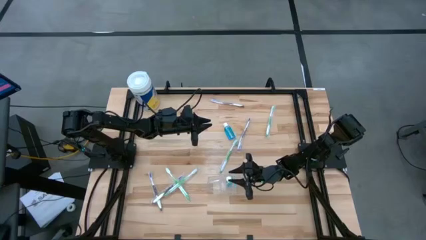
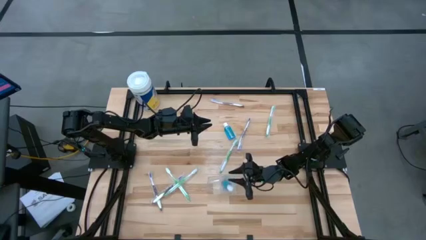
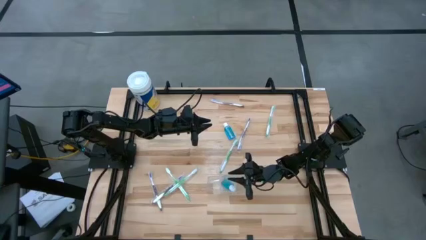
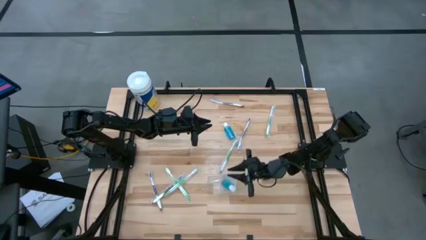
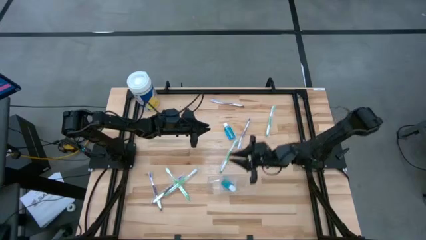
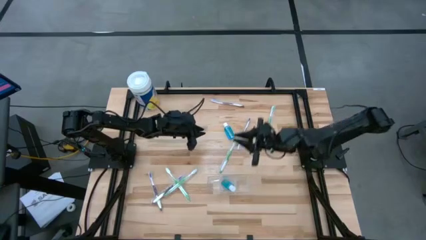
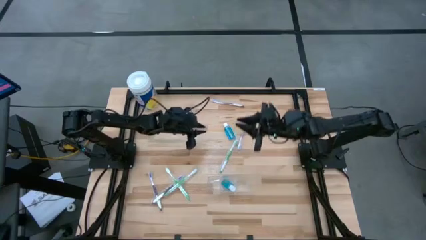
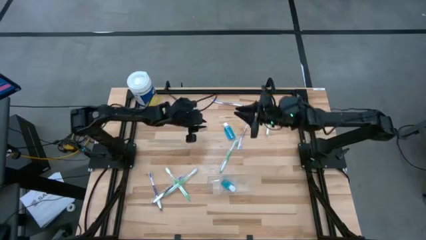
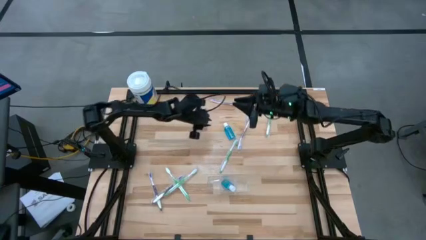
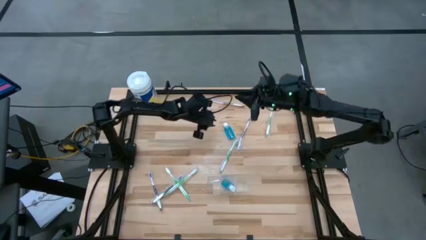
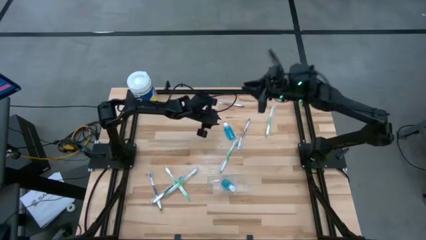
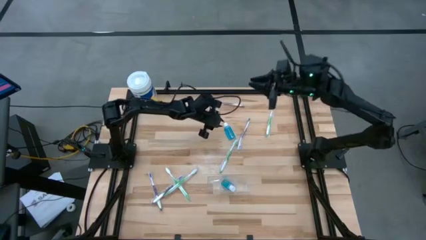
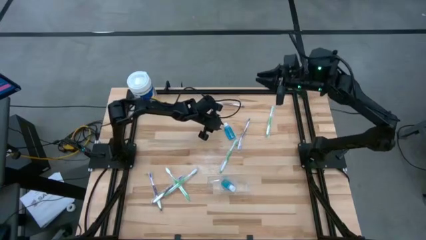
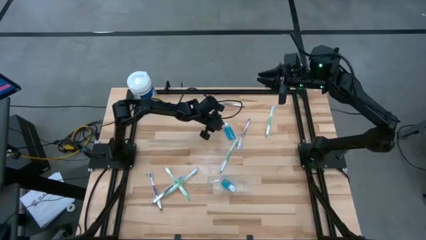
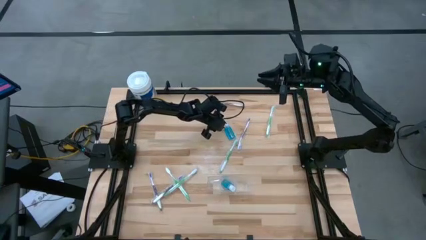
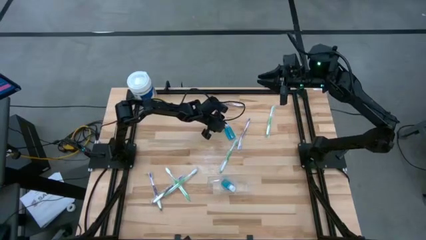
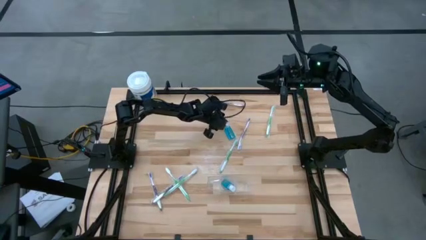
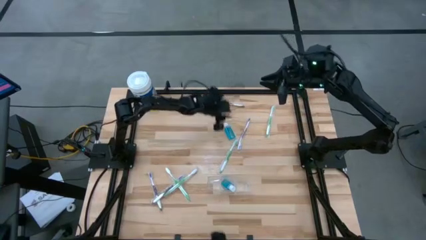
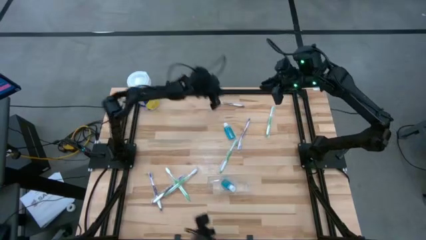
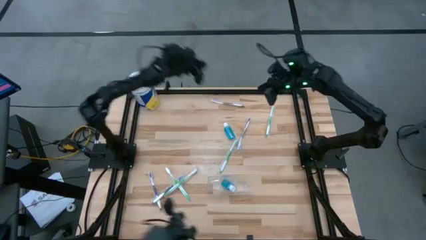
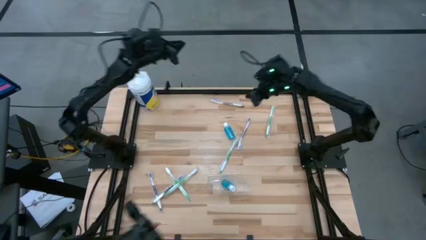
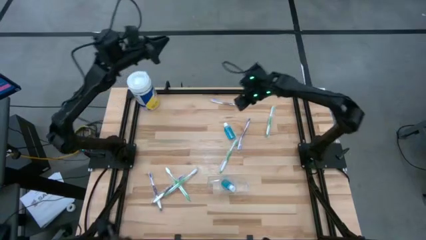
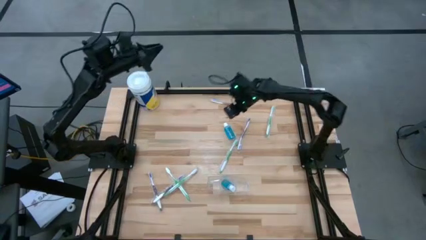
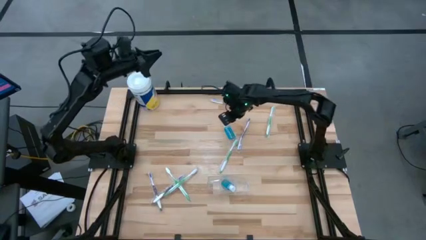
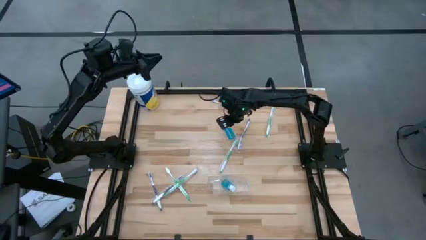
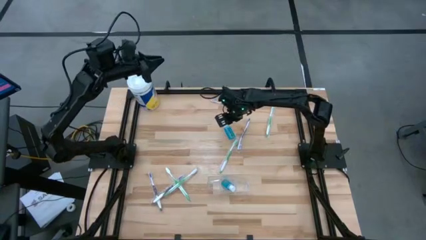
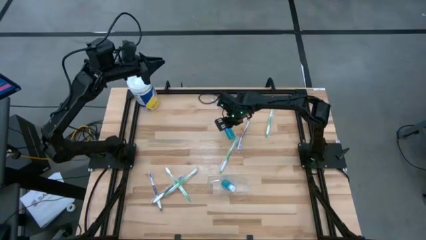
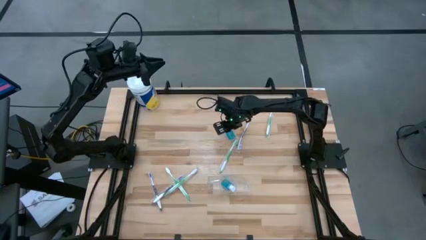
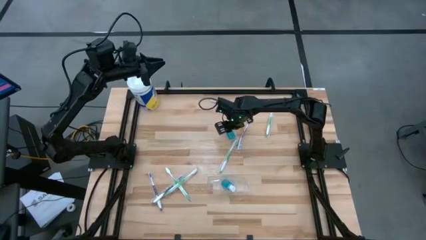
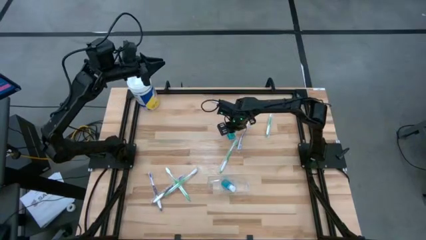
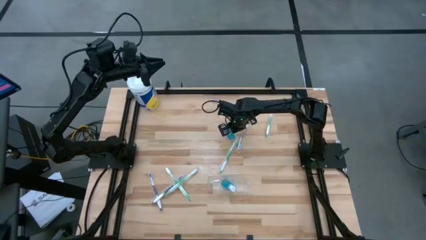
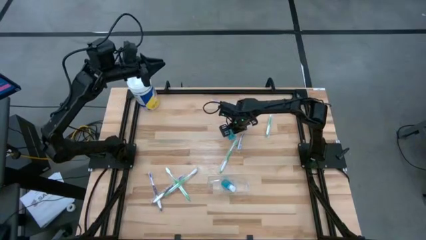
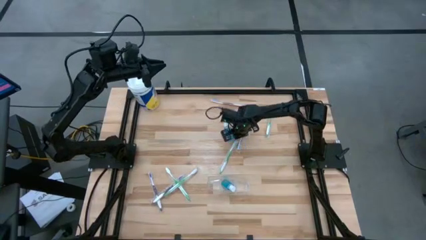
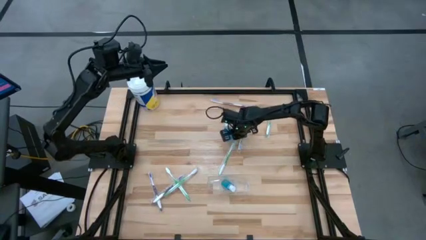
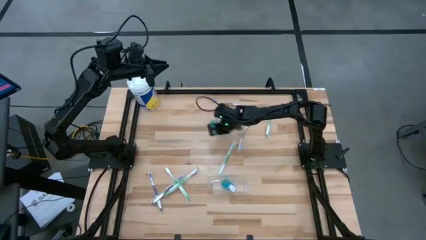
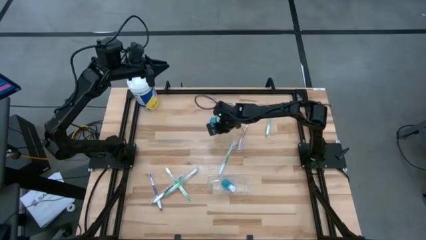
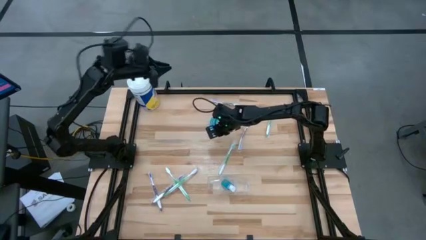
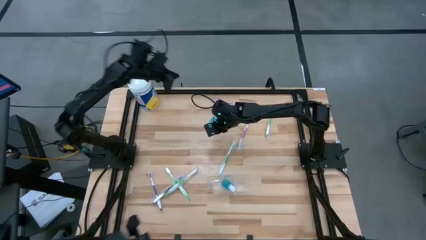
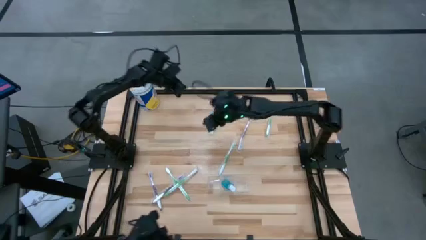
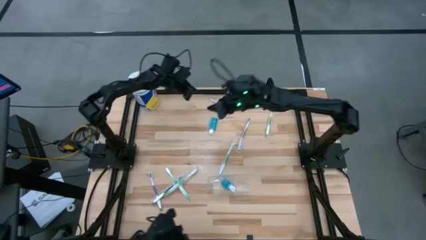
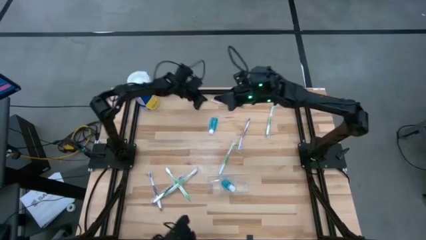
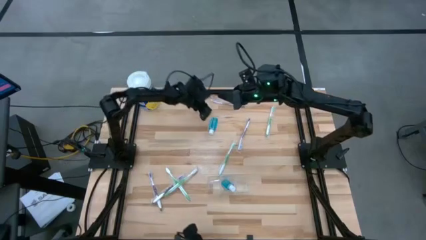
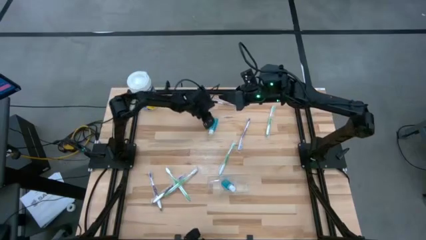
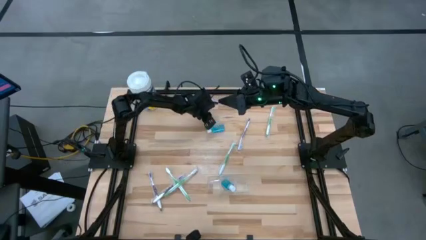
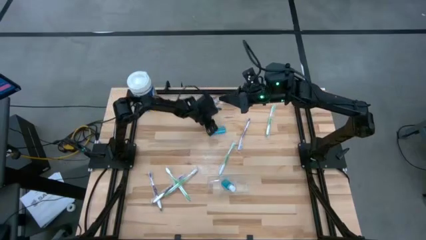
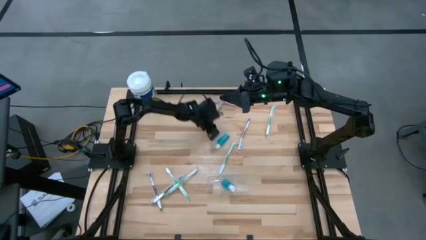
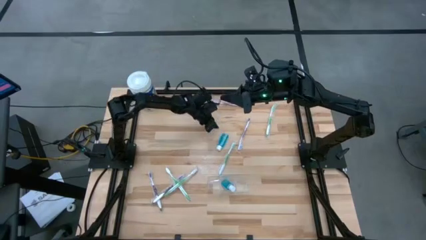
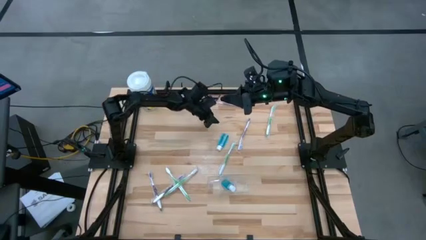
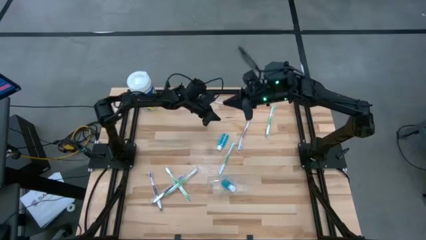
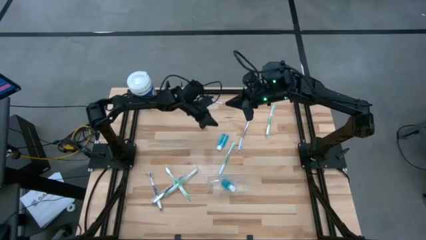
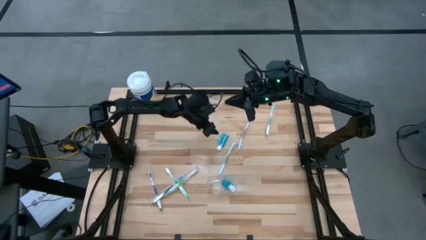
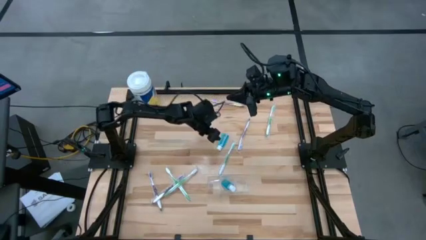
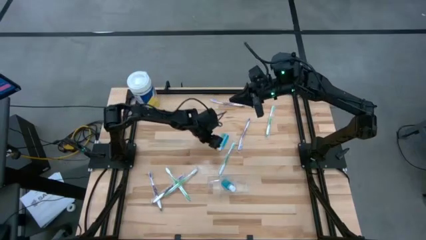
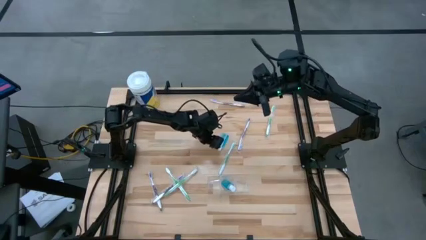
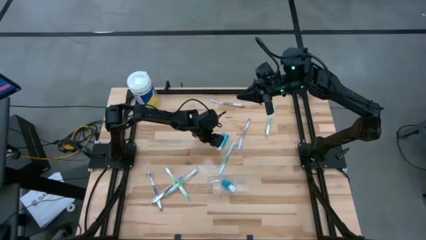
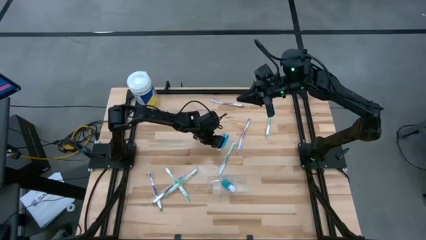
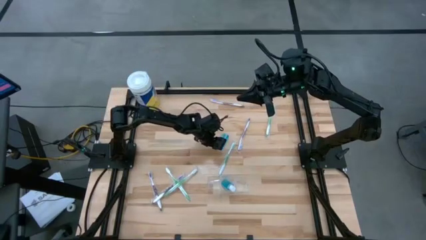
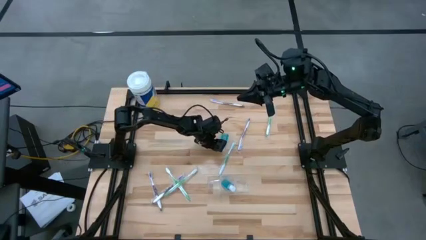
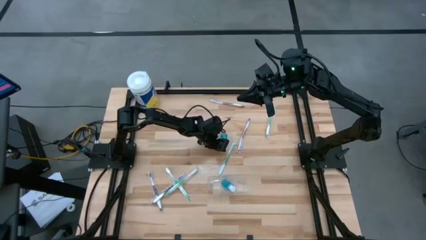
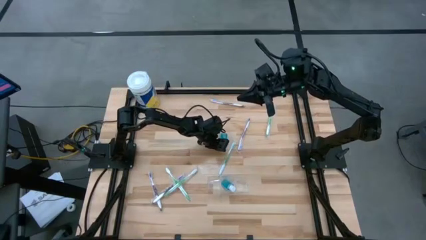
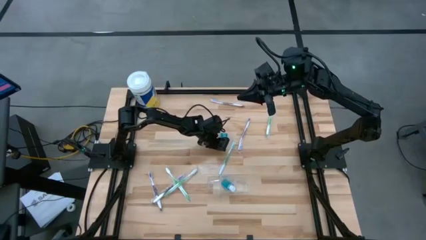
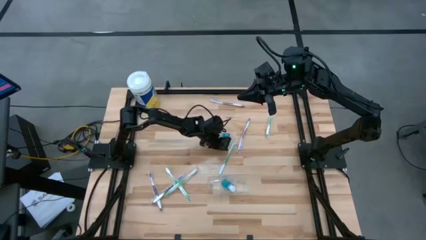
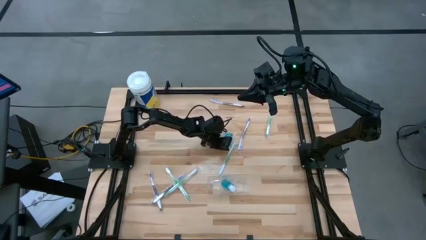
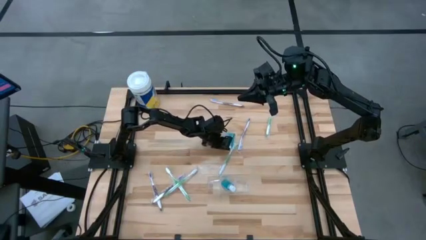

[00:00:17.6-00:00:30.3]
Task: Pick & Place toothbrushing station
Put the blue mouthwash bottle in the transparent organizer

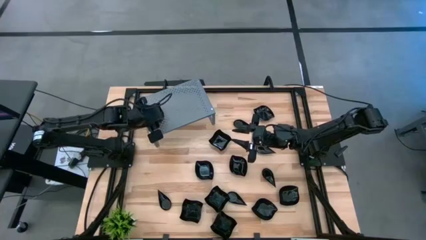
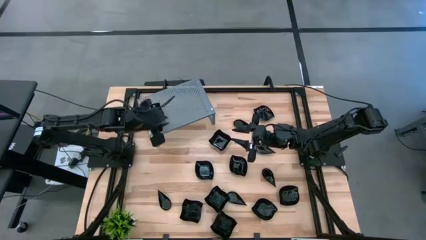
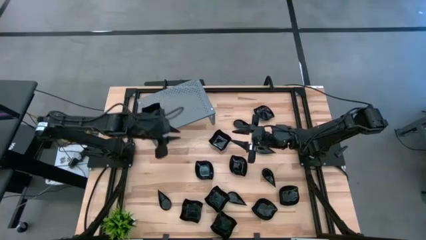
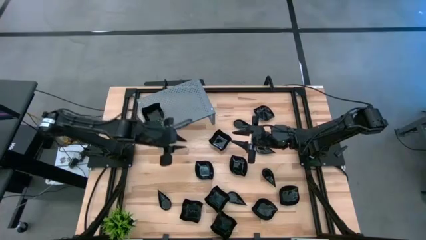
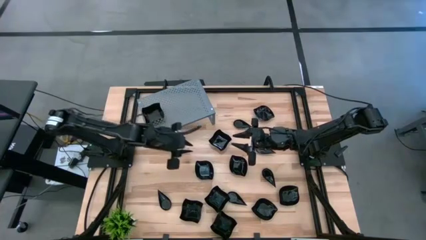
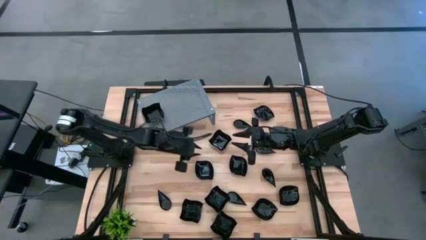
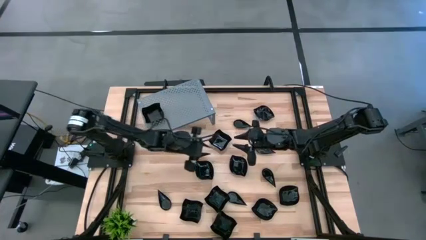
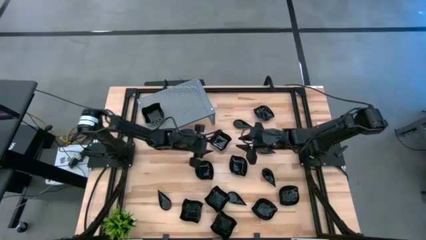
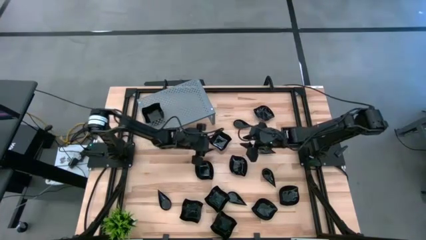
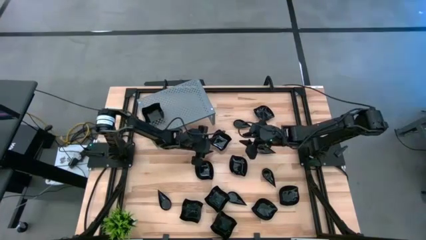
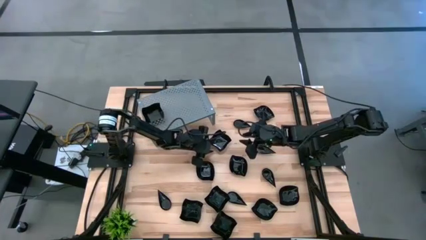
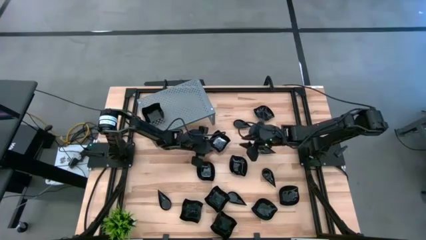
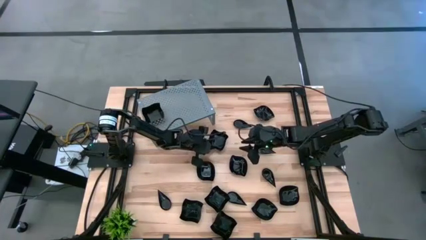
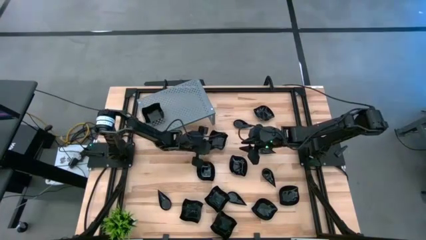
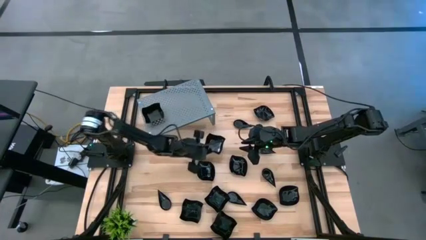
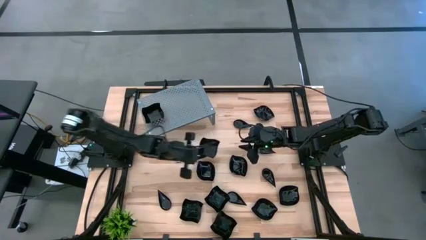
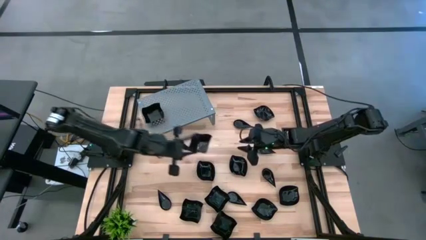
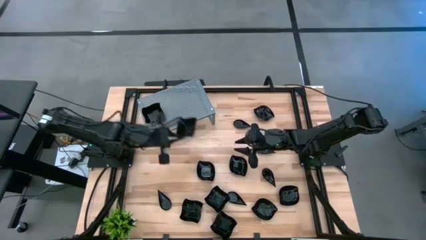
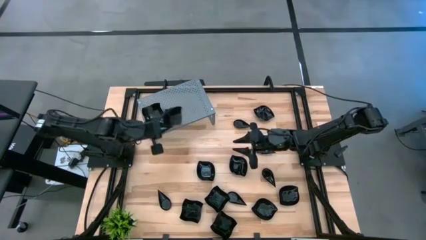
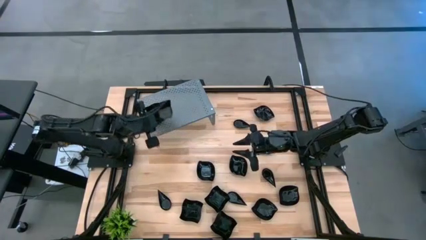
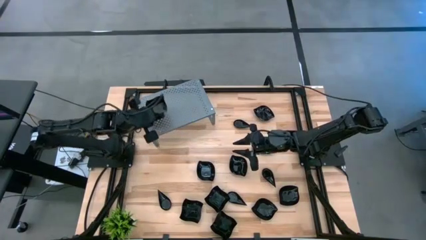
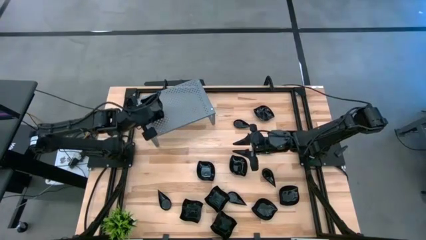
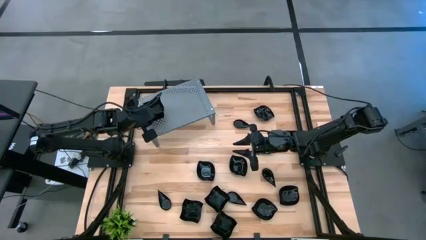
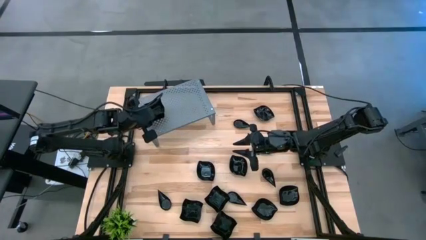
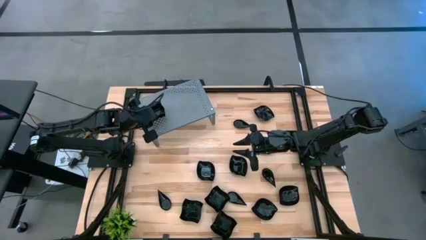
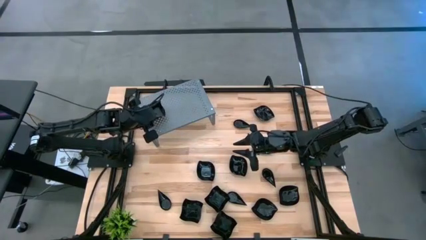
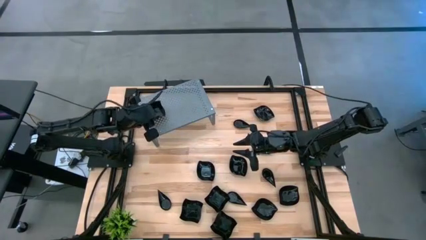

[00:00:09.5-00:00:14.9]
Task: Pick & Place Mini shaped plates
Stack the black distorted square plate on top of the black distorted square plate on the shelf
